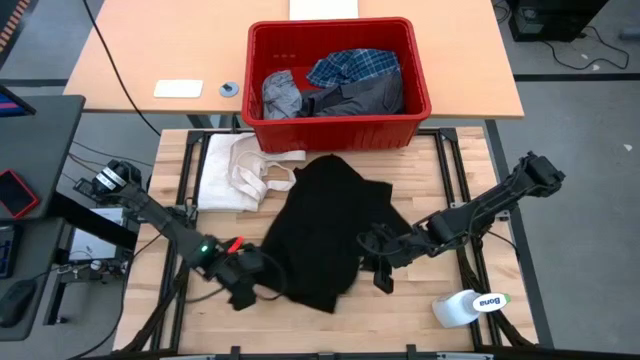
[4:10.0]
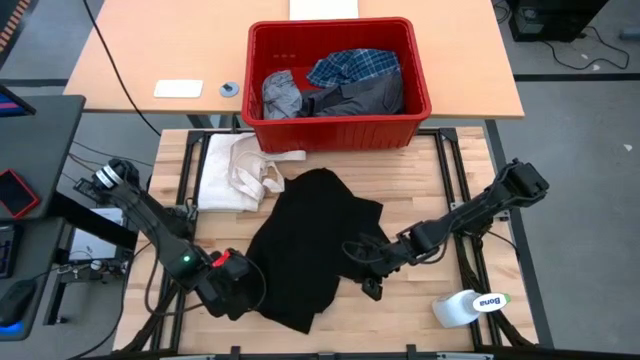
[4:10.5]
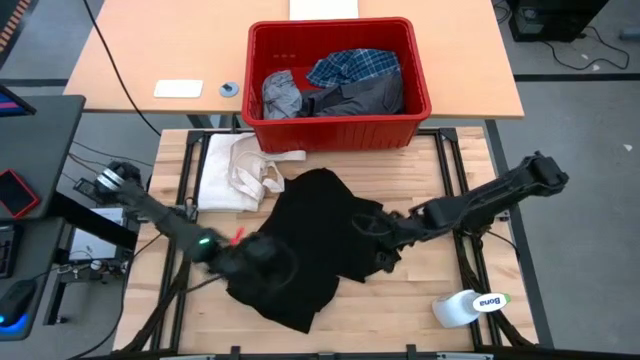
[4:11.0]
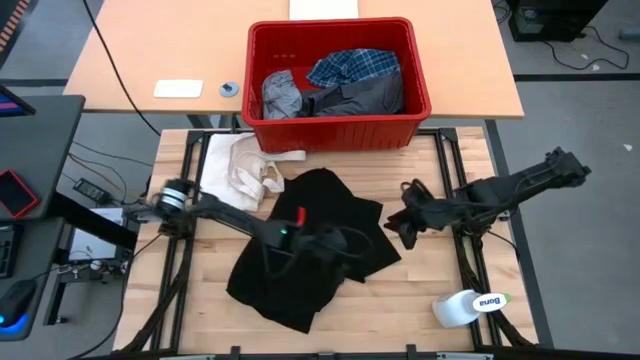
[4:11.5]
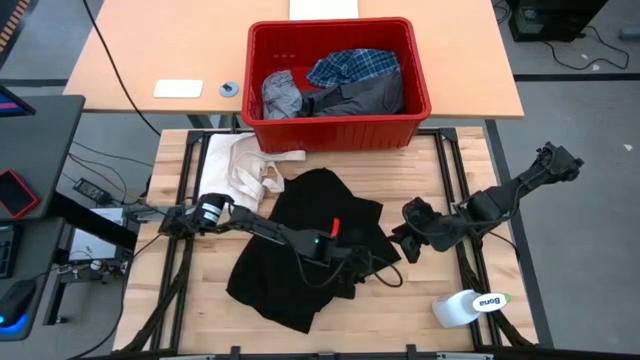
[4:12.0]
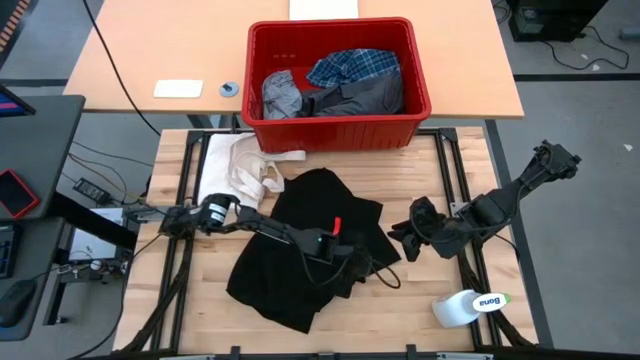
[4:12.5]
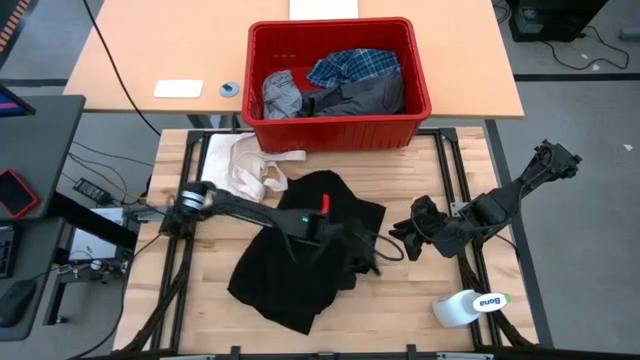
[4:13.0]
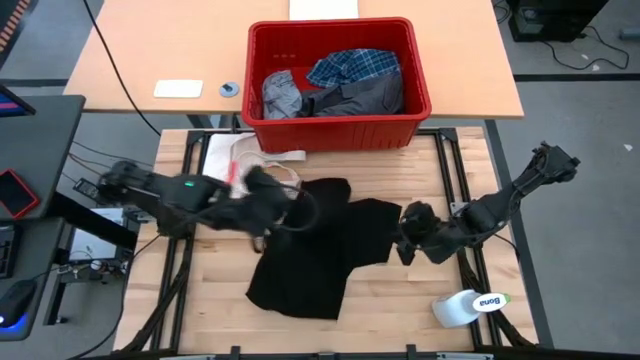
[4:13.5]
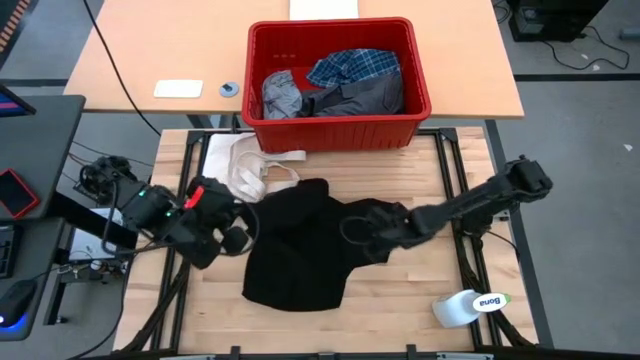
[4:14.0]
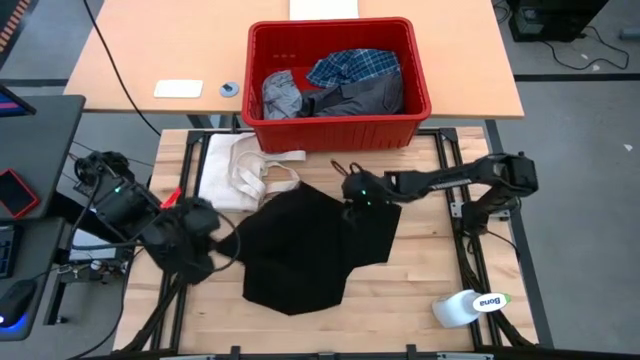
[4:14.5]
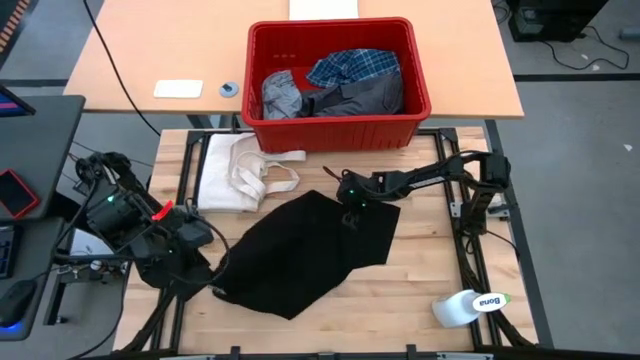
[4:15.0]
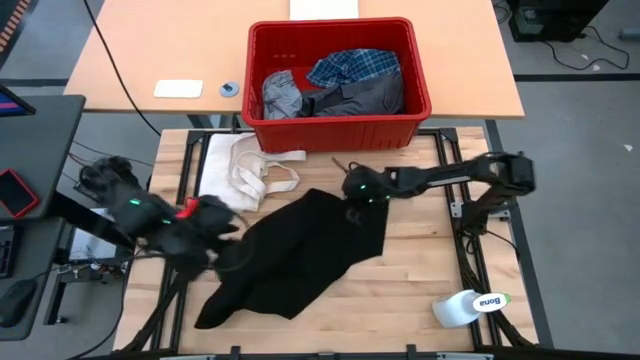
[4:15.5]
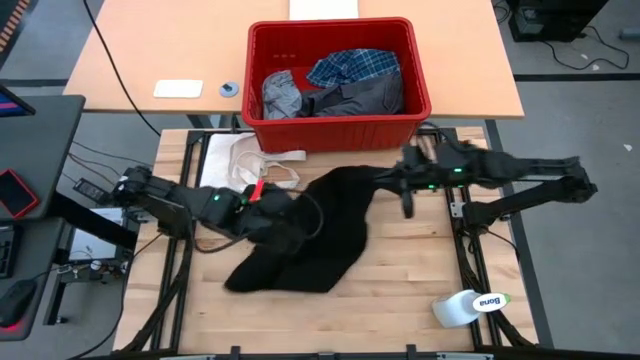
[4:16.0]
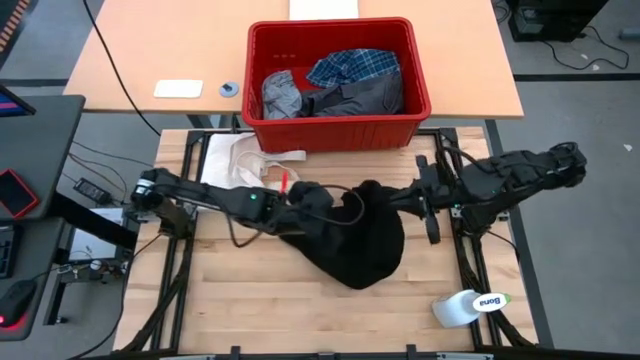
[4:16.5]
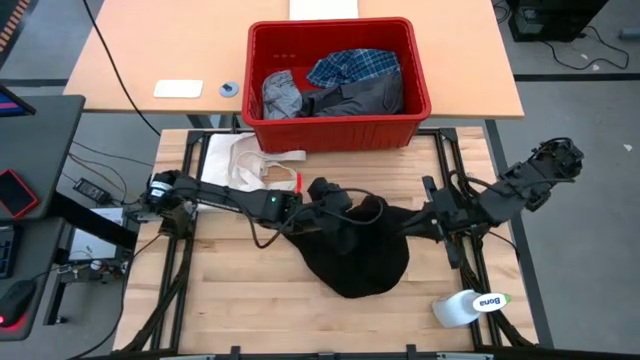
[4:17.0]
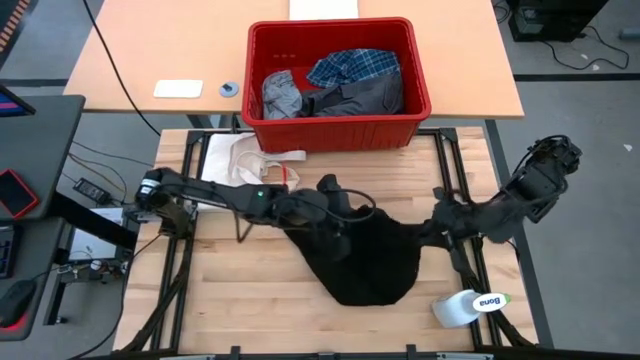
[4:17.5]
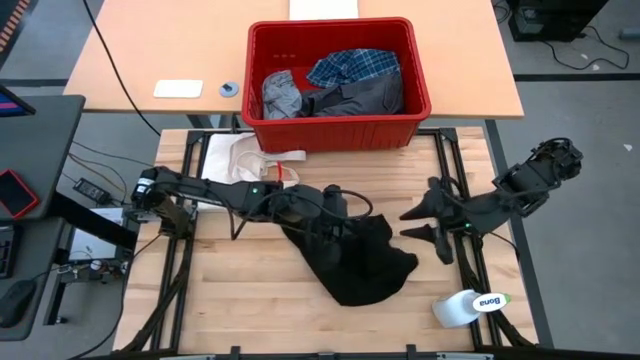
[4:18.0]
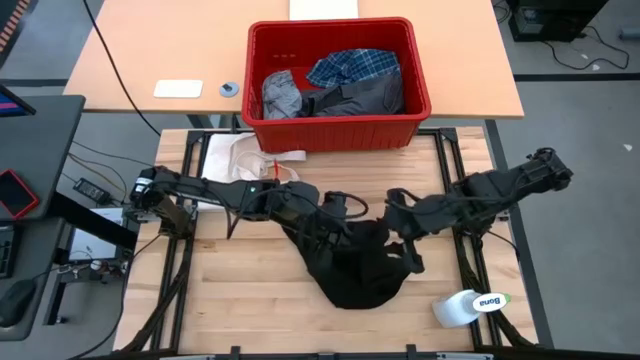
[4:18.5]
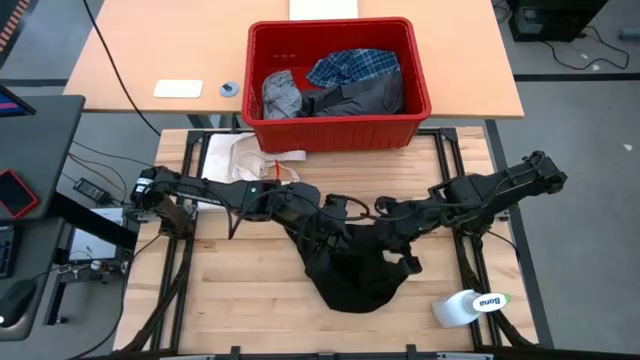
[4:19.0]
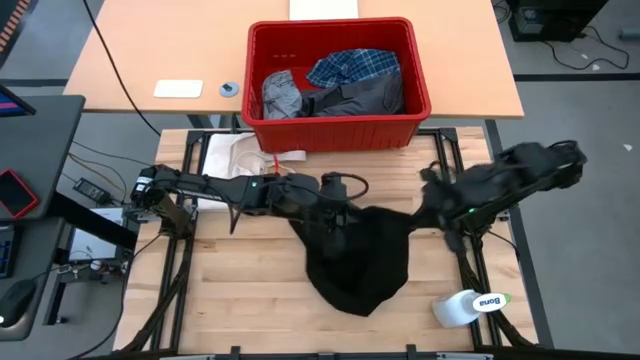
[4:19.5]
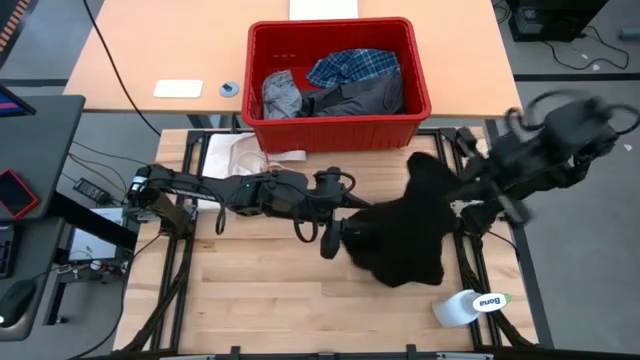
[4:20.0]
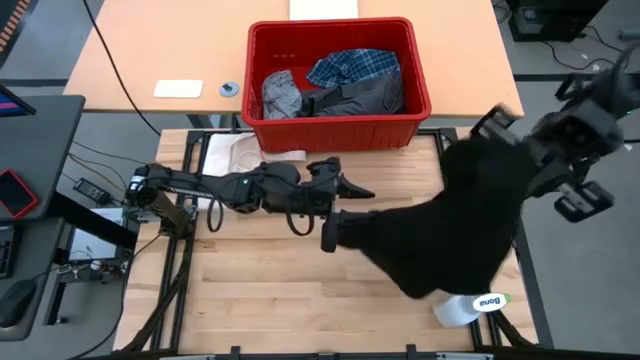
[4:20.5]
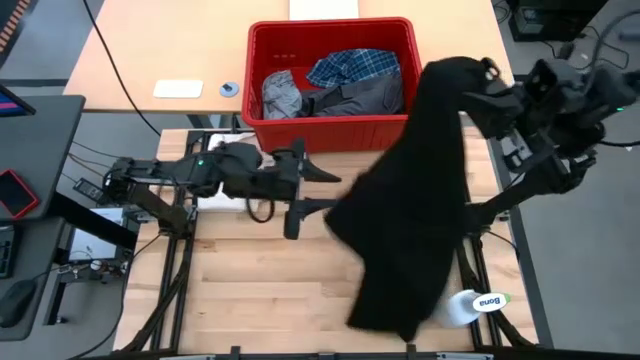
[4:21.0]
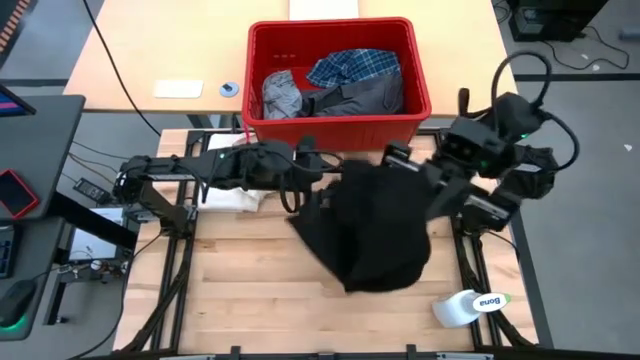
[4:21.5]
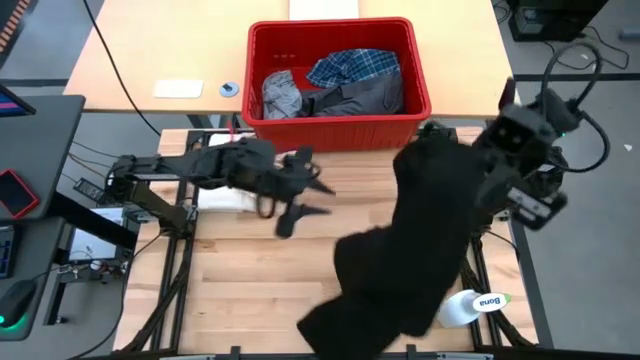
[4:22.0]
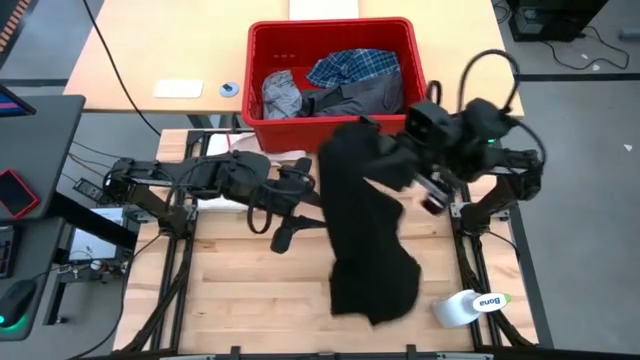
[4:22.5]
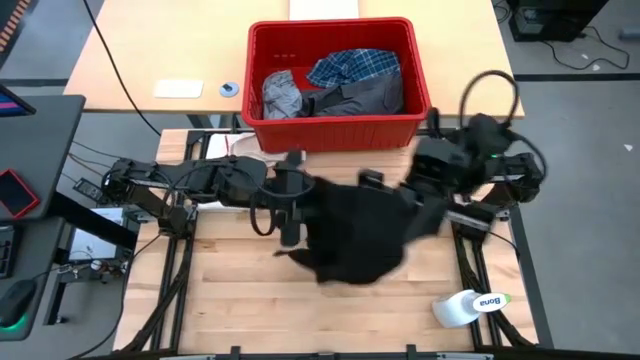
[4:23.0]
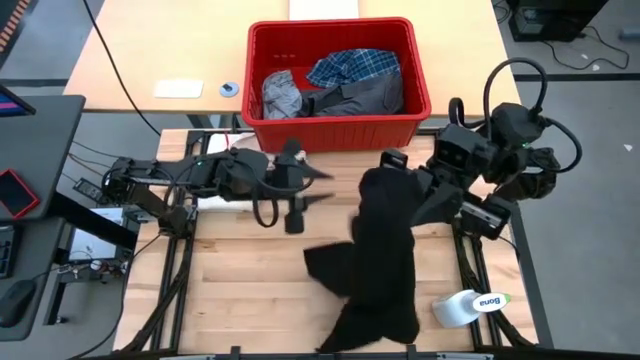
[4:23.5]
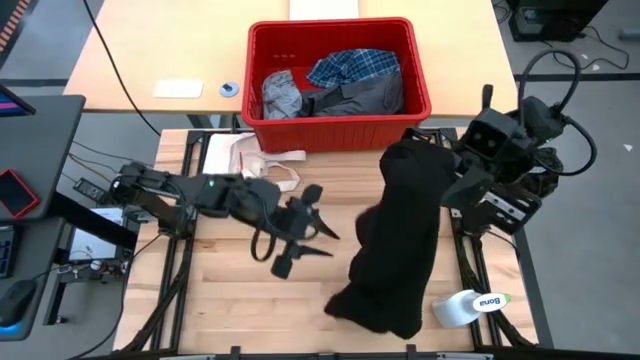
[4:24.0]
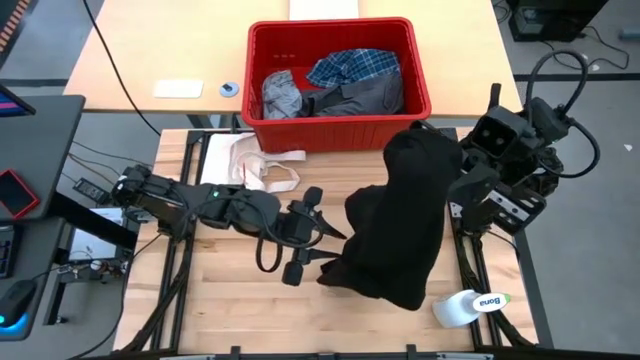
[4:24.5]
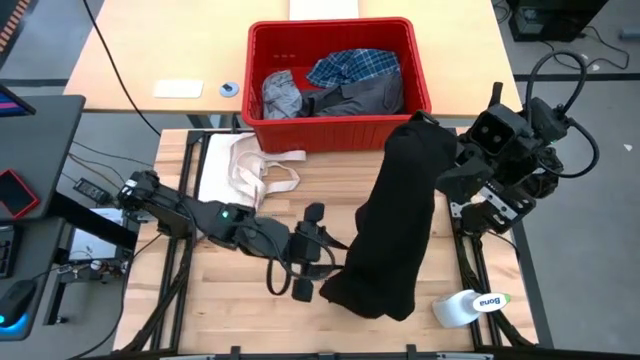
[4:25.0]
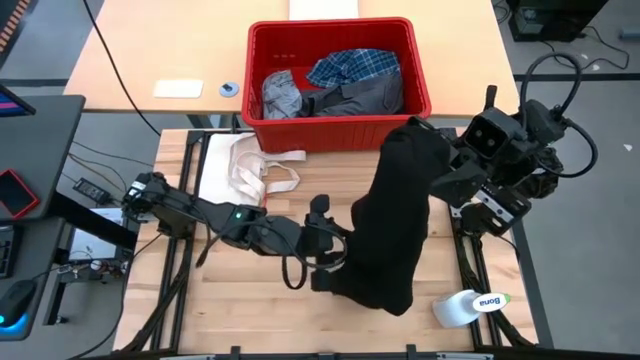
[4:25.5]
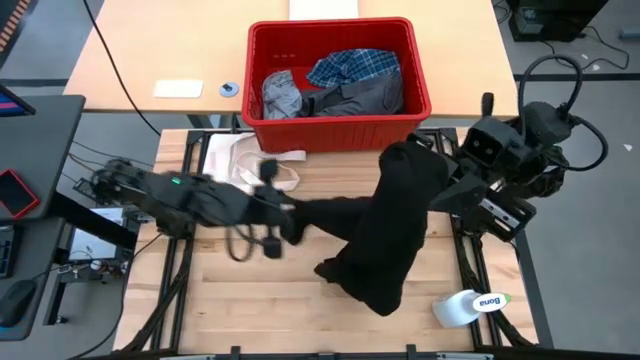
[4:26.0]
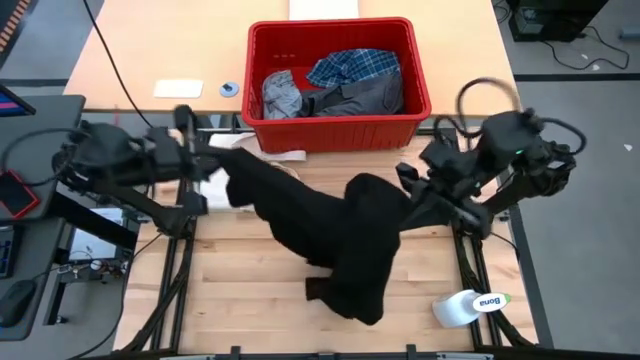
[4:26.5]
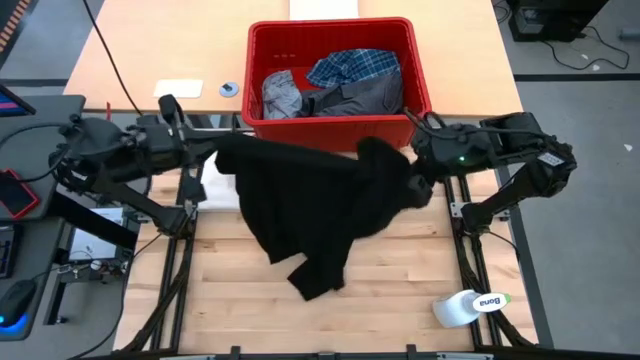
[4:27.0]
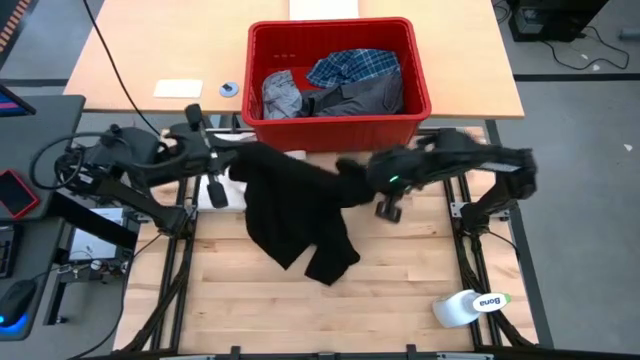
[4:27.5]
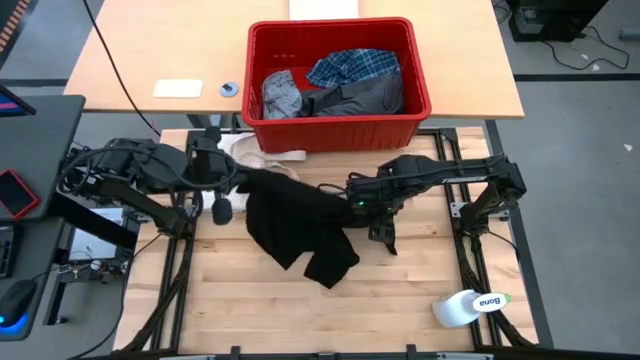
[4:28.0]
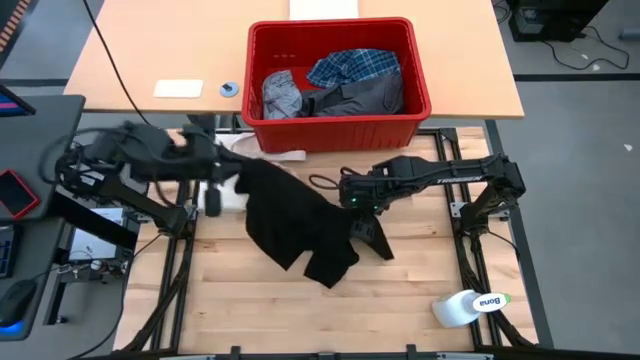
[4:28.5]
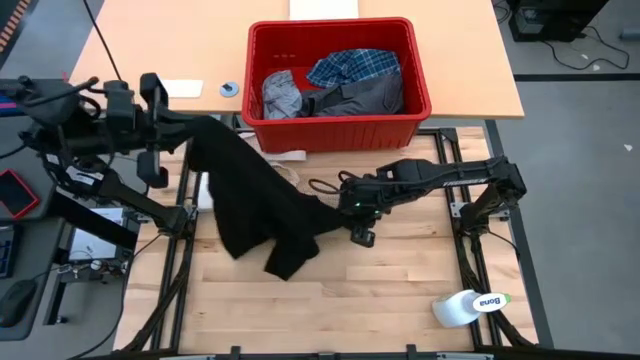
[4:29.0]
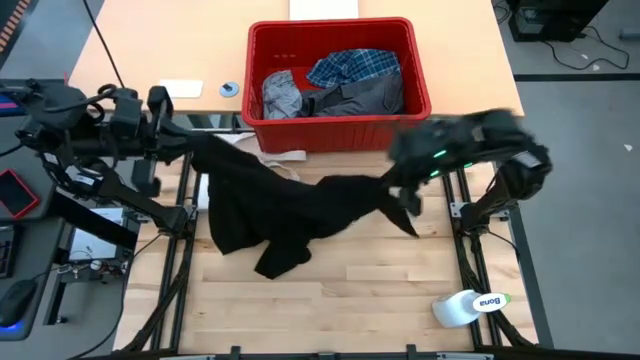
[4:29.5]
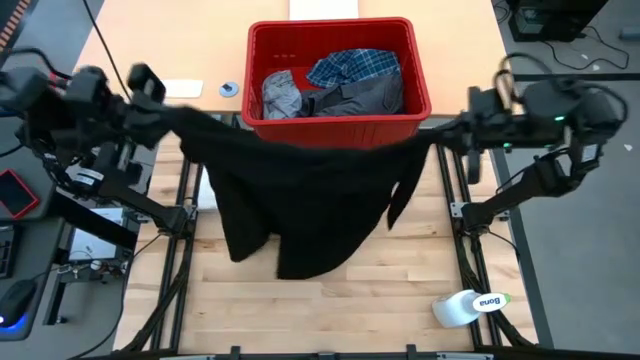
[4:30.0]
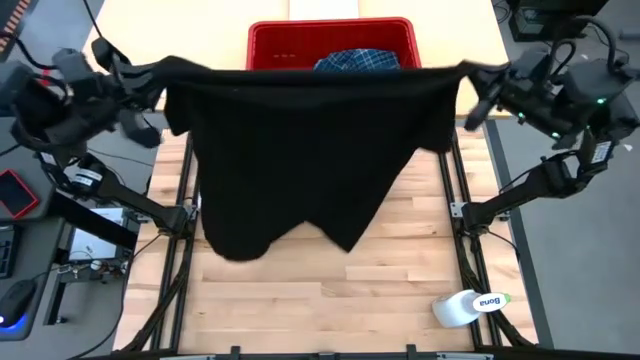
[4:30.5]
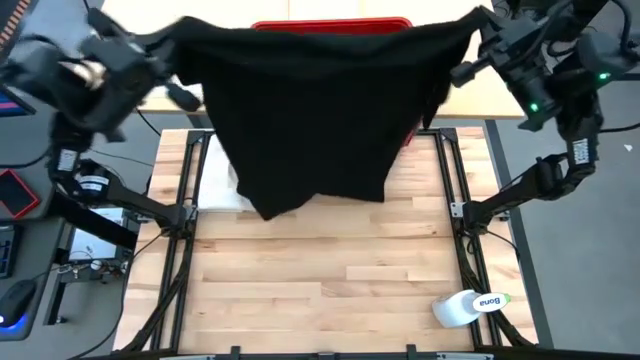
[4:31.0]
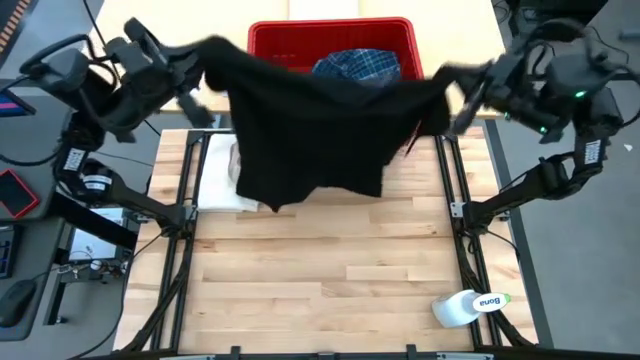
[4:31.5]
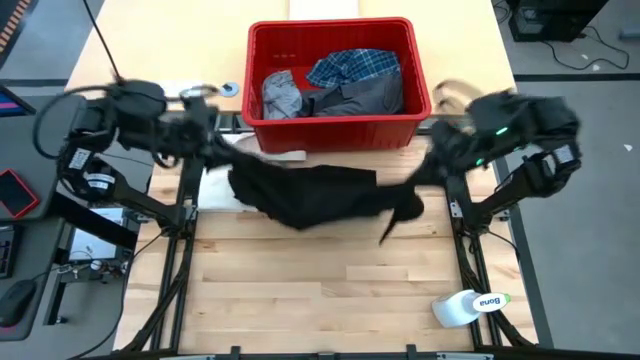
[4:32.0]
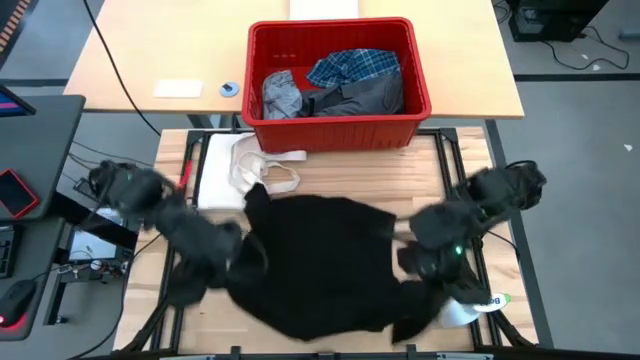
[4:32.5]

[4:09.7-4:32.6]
Task: Fold Laundry from Bin
Fold the black shirt
